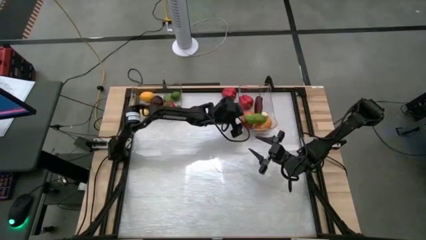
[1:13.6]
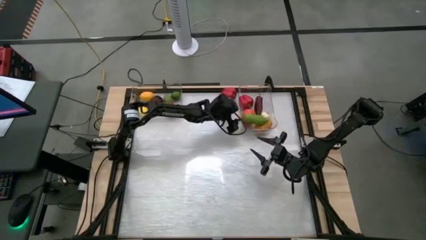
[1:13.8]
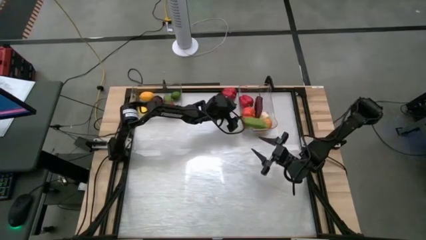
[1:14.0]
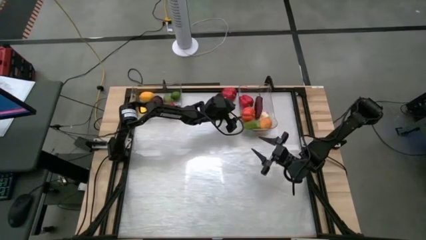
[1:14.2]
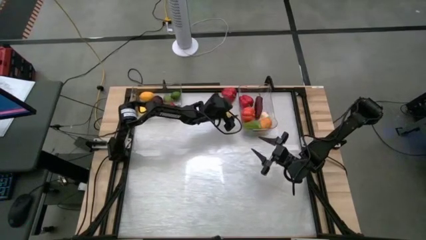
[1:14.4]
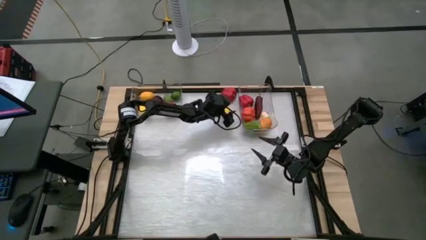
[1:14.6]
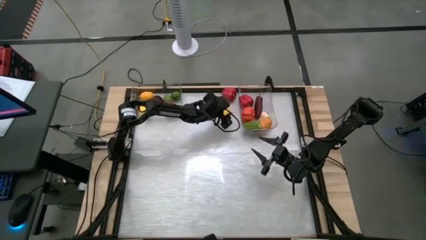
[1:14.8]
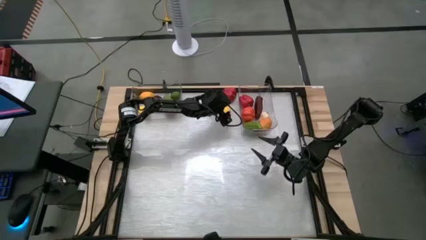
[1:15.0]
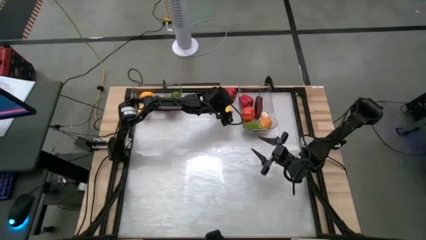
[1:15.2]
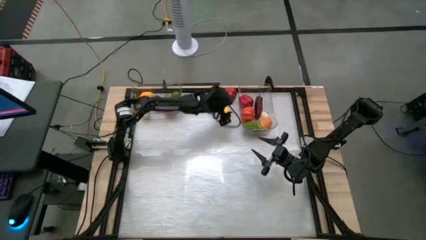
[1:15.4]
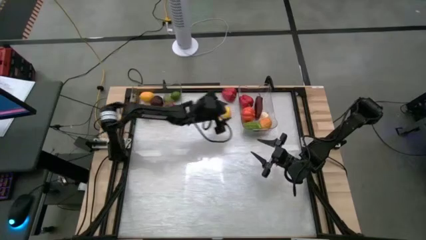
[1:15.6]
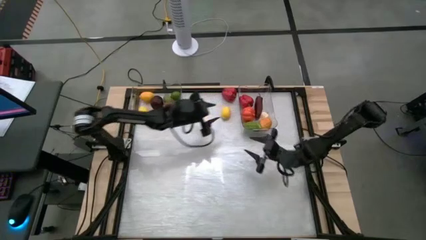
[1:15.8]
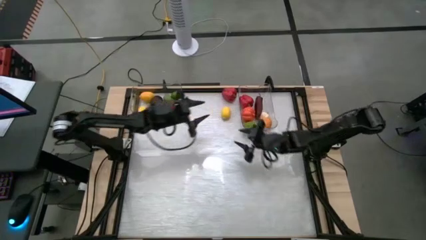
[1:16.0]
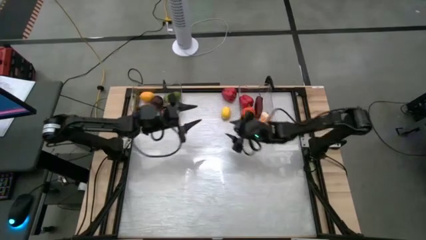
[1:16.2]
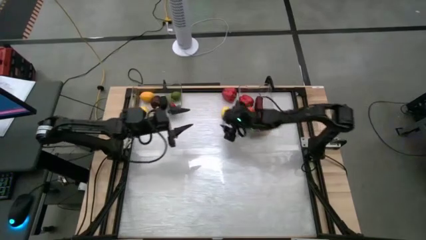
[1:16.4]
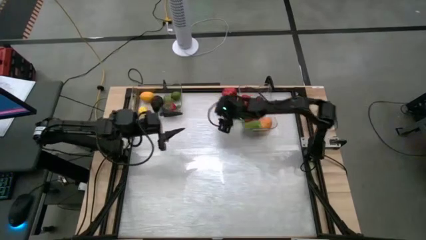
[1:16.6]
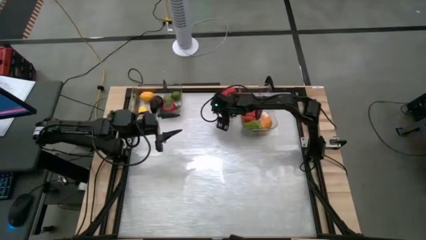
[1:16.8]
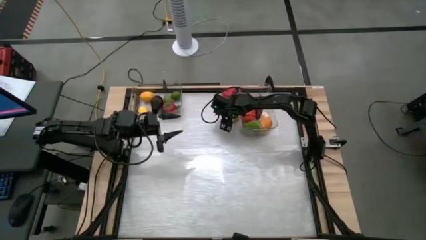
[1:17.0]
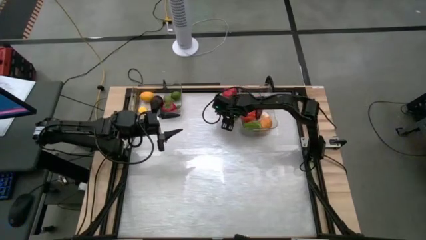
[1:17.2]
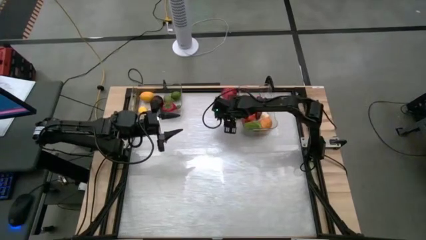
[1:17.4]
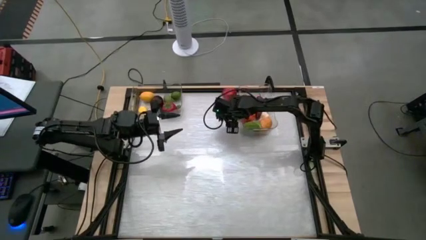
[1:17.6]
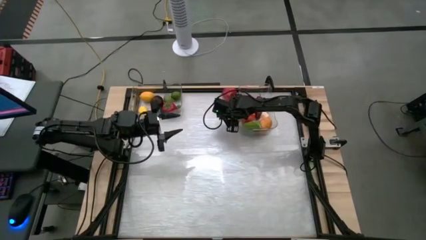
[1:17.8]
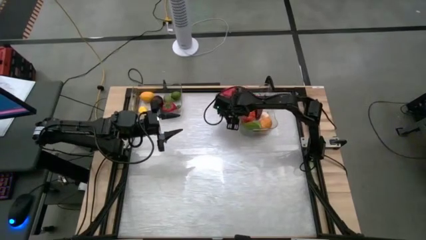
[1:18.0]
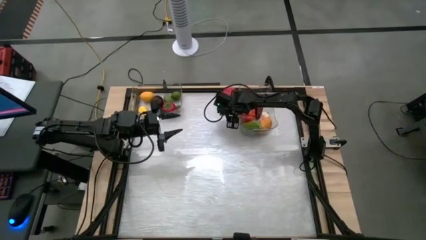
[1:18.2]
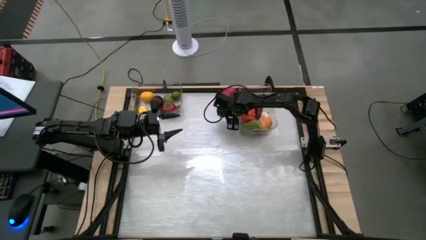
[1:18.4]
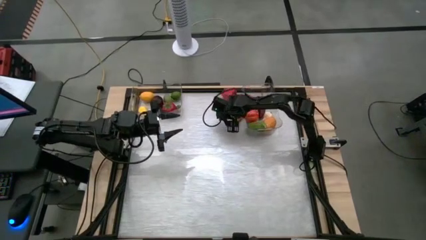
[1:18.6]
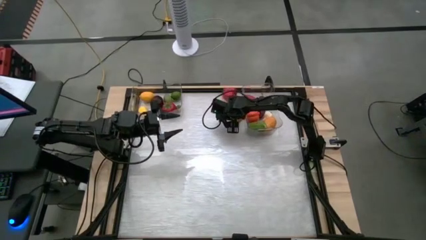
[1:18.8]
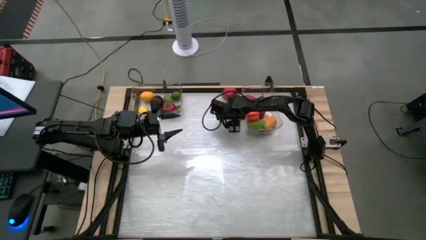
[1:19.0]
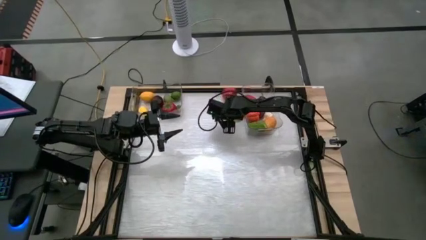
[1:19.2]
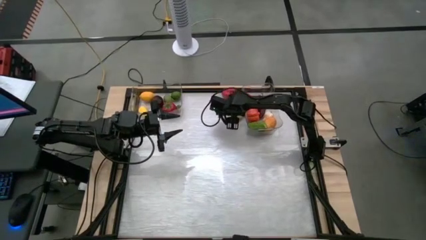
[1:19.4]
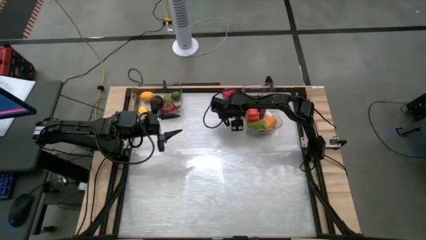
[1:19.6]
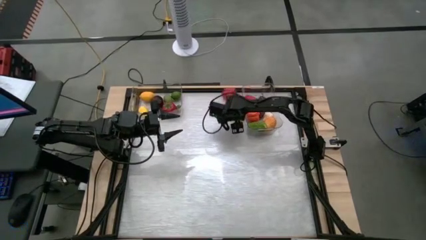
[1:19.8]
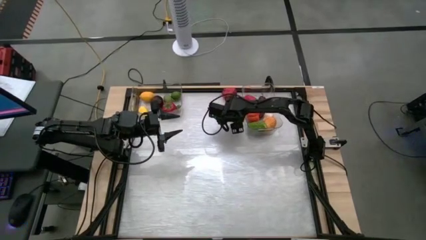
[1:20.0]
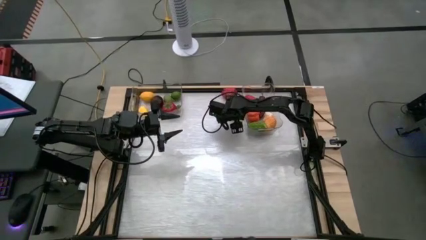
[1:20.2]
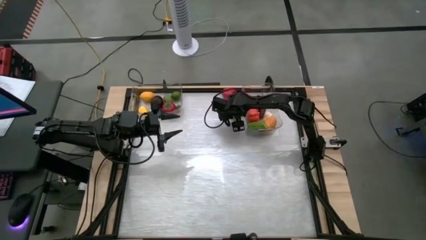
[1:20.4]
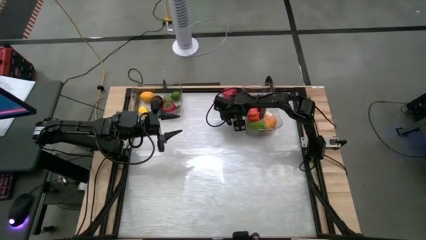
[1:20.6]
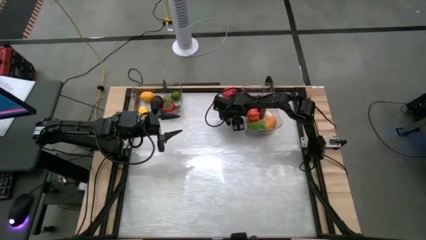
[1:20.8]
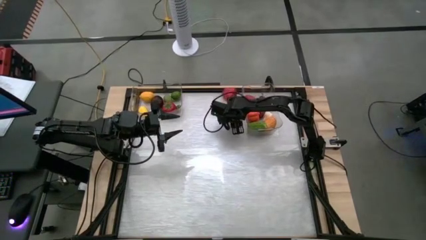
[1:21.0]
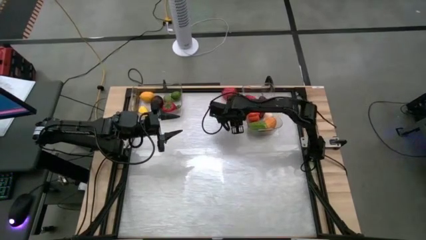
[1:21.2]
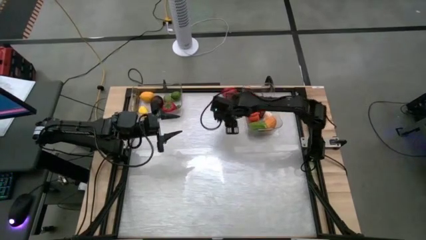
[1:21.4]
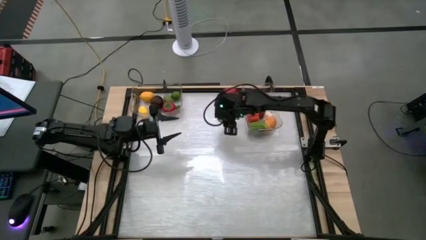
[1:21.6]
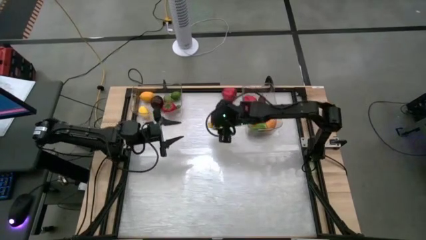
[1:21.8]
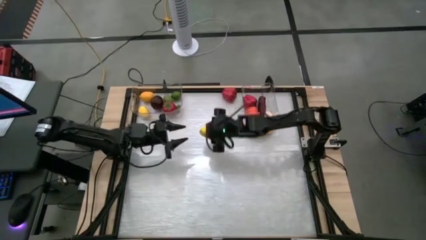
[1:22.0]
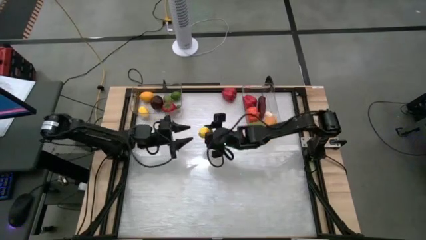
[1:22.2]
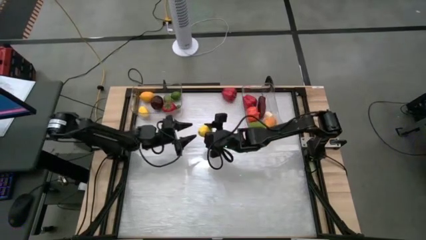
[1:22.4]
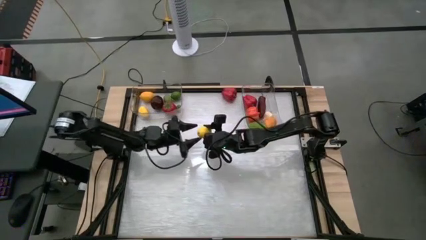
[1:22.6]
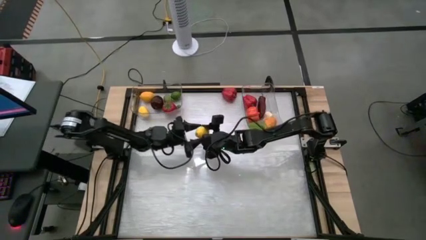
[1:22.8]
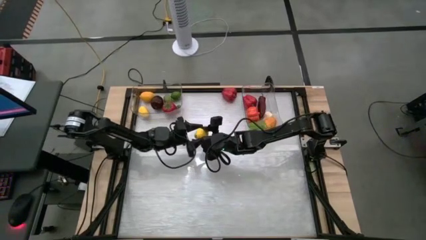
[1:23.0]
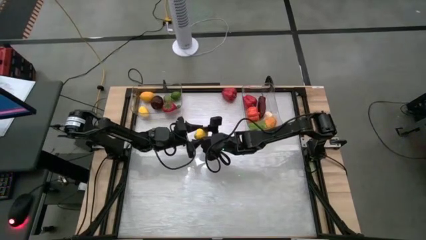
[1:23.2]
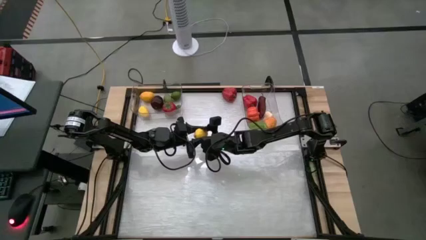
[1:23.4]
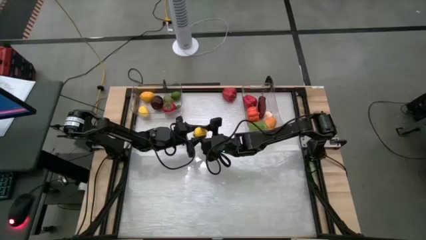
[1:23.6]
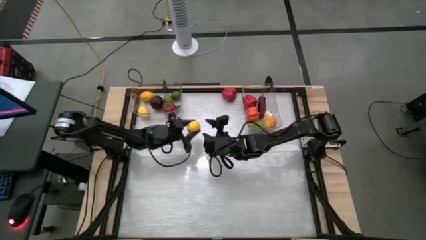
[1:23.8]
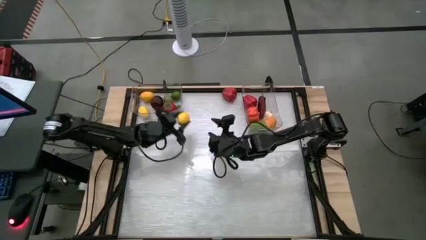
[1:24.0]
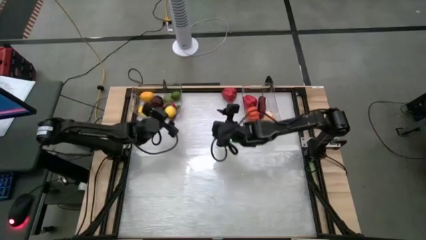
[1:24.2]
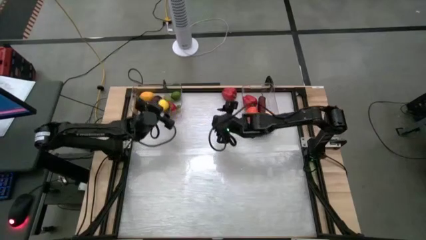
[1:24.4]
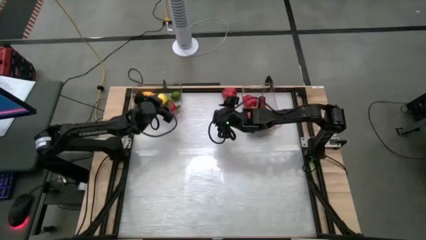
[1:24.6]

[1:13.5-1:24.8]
Task: Sort produce into baskets
Put the yellow lemon into the left transparent bin

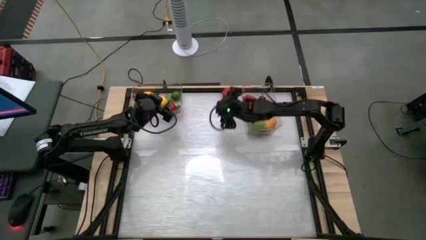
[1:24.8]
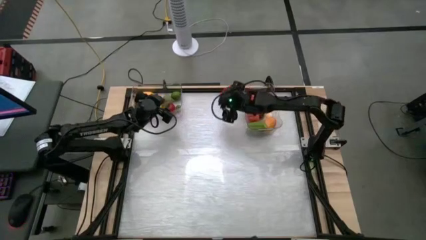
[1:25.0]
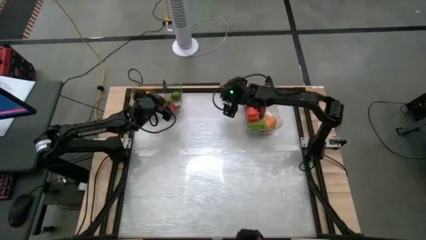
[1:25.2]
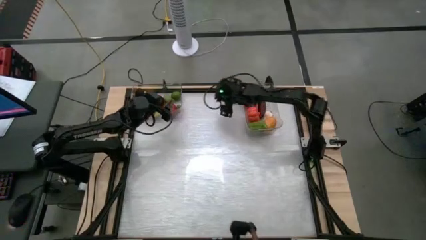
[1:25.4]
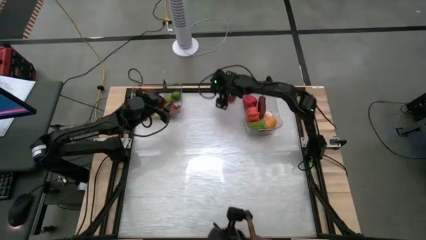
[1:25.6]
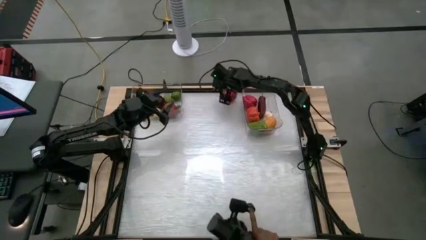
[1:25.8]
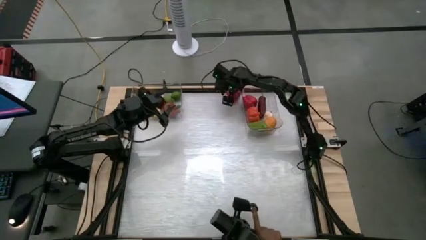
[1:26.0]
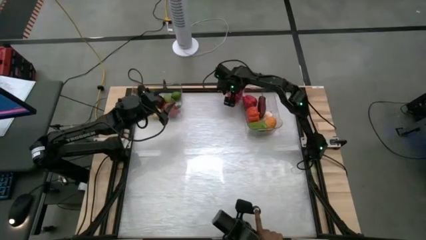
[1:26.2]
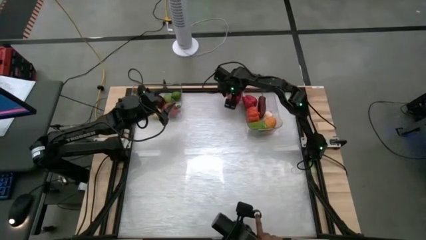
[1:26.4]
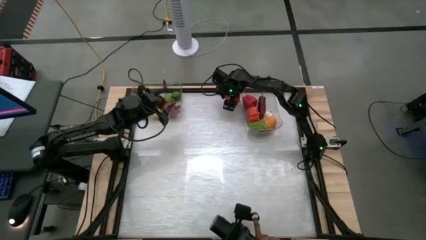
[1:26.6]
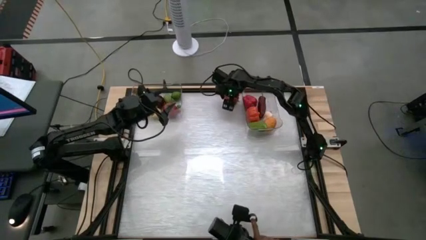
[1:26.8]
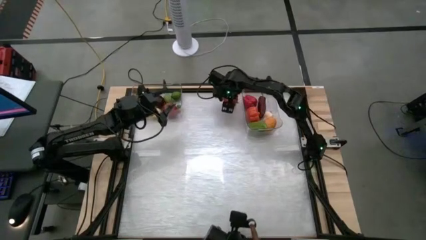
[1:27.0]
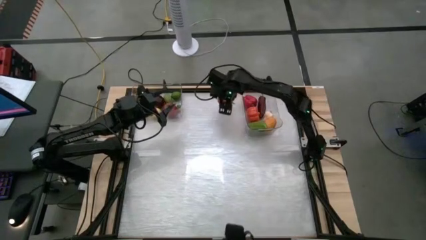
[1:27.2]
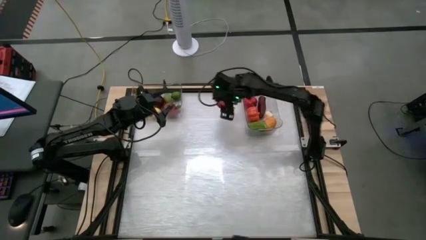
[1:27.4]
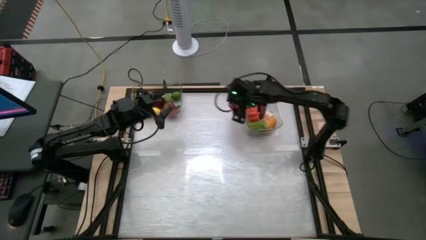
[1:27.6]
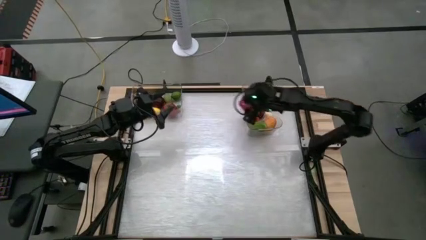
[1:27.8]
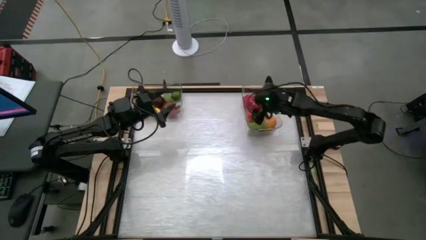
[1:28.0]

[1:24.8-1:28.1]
Put the red pepper into the right transparent bin

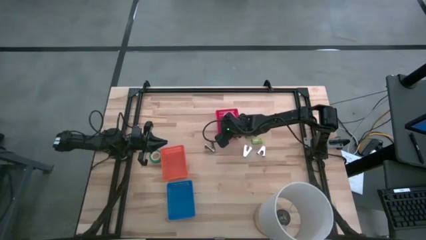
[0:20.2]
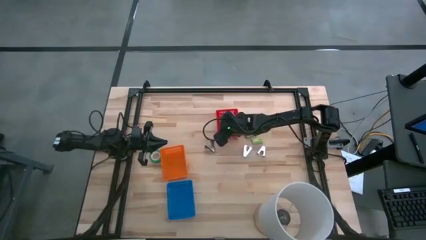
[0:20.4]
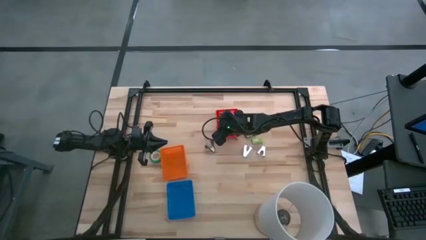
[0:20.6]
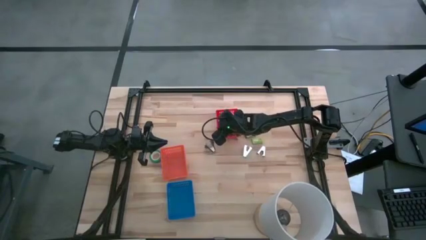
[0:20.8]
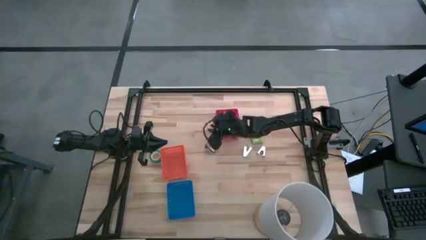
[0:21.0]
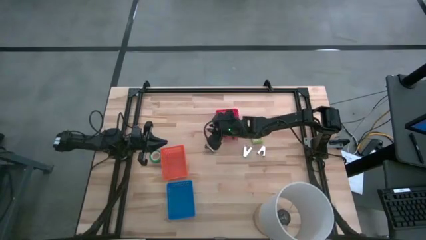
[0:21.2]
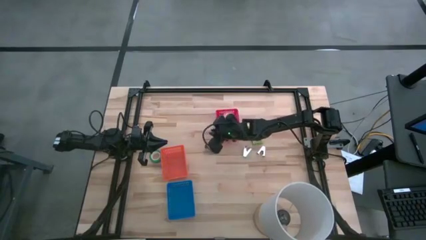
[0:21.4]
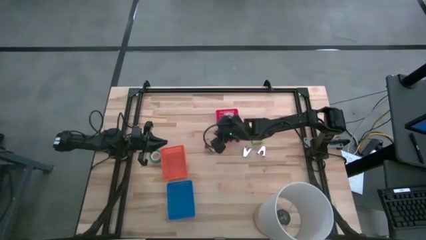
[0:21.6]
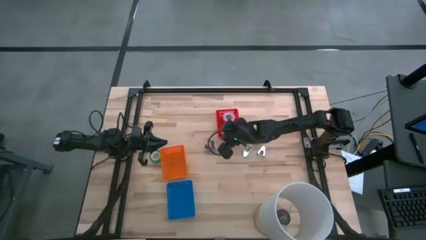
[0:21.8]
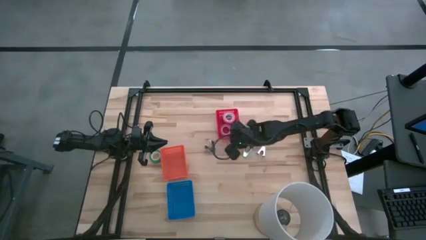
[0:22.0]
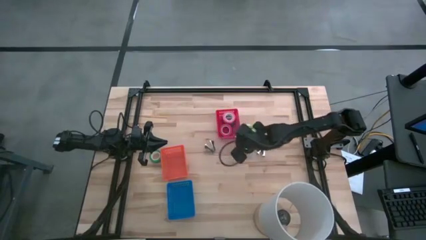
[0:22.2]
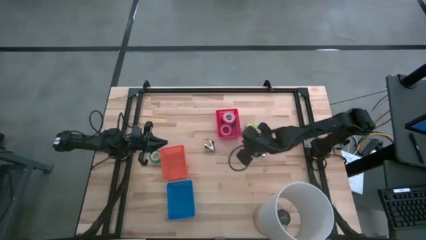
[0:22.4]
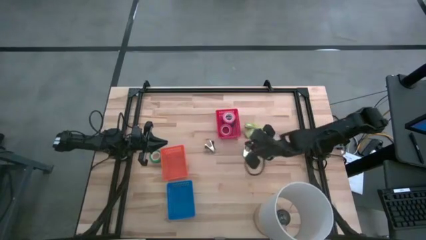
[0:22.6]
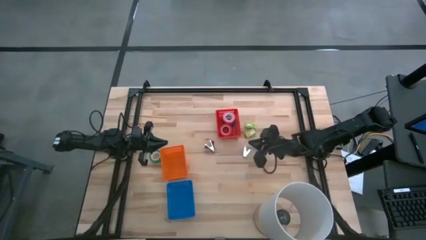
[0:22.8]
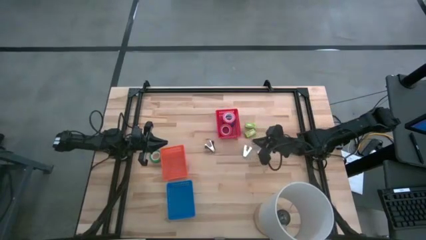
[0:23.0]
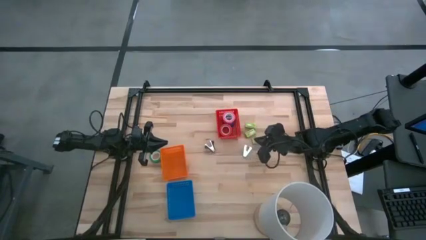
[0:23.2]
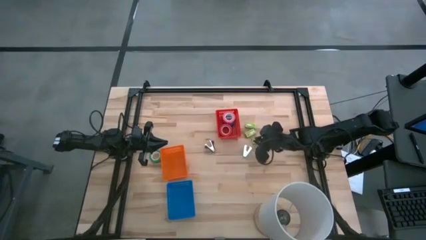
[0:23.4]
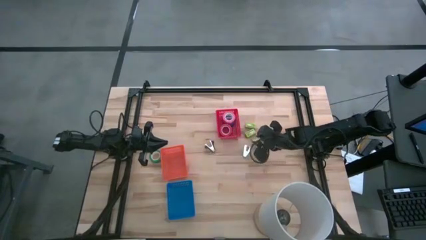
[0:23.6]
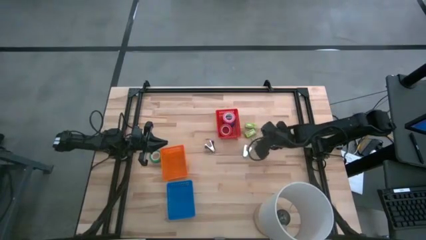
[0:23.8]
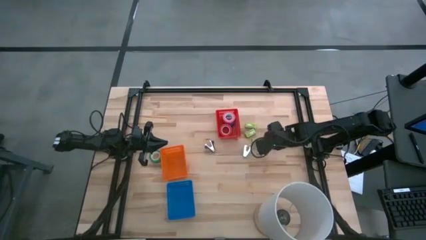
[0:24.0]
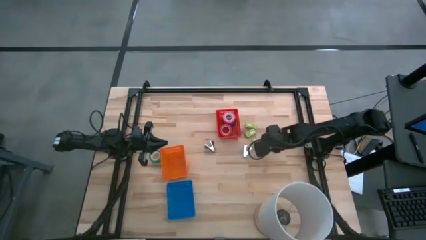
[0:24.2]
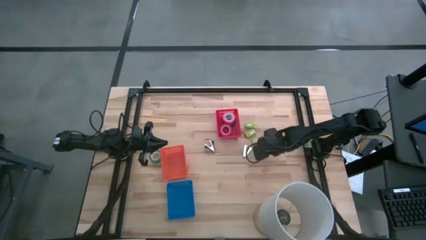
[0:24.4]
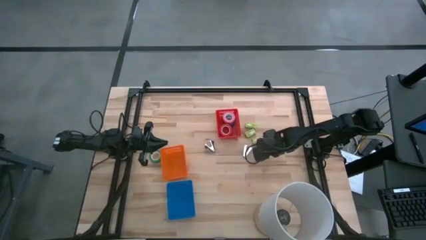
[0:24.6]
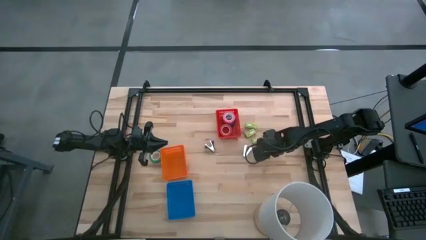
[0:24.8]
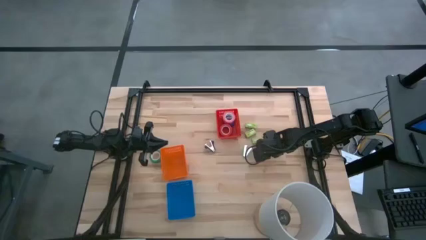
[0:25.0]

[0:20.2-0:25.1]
Task: Pick and place Stapler, Stapler remover, tape
Put the purple staple remover into the blue bin
